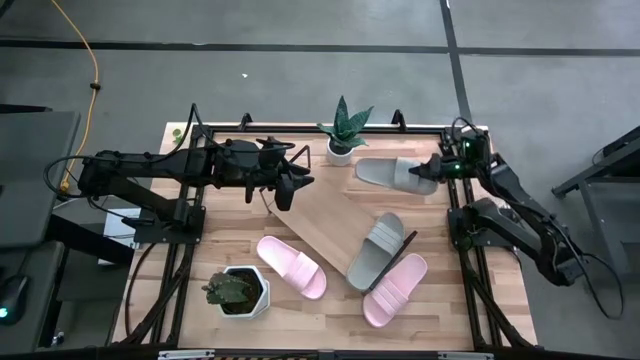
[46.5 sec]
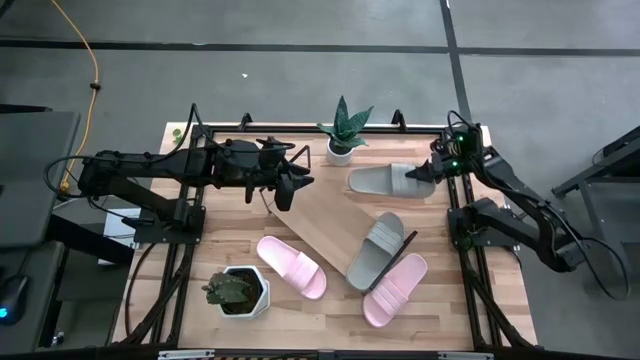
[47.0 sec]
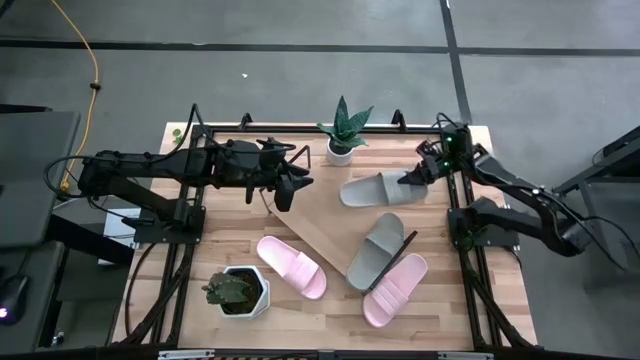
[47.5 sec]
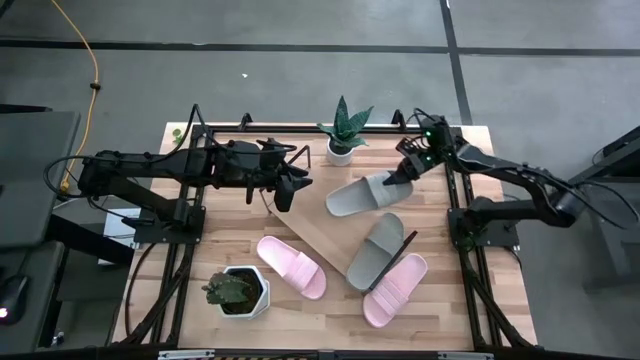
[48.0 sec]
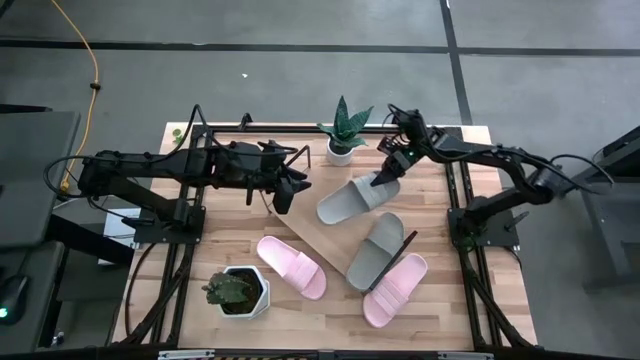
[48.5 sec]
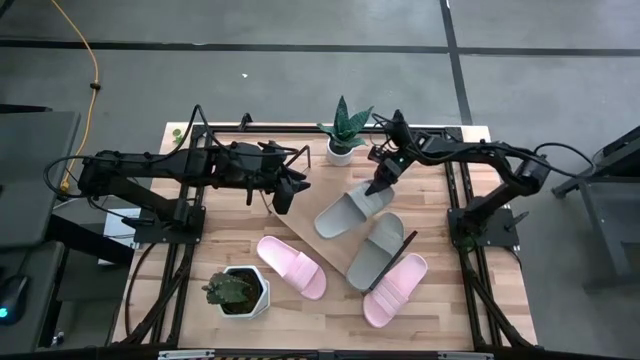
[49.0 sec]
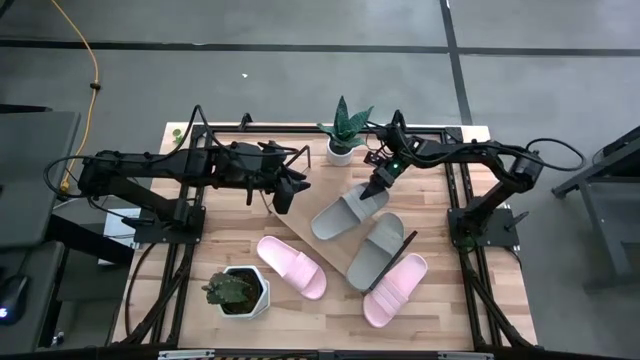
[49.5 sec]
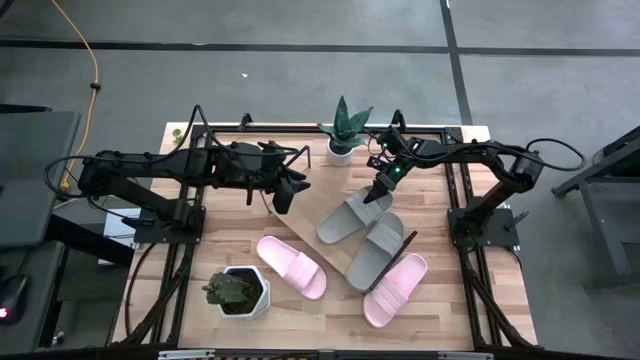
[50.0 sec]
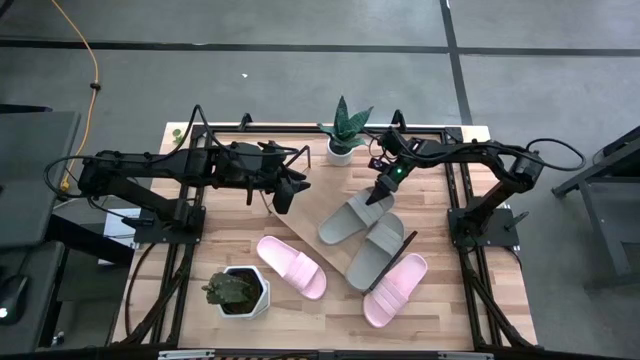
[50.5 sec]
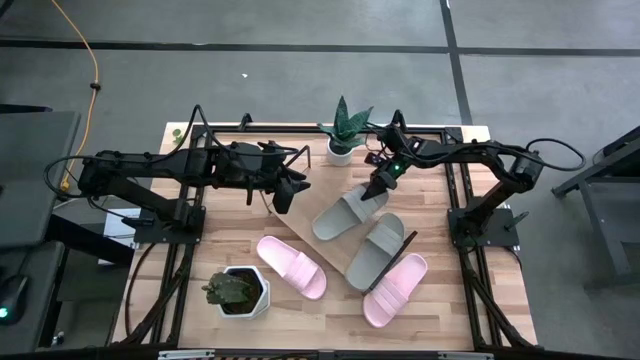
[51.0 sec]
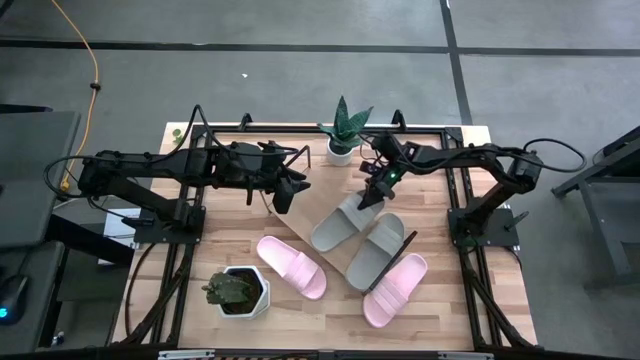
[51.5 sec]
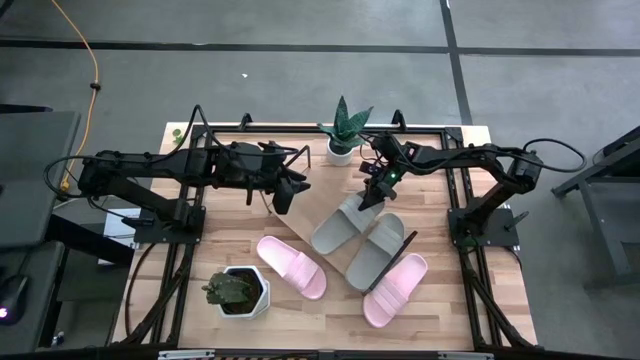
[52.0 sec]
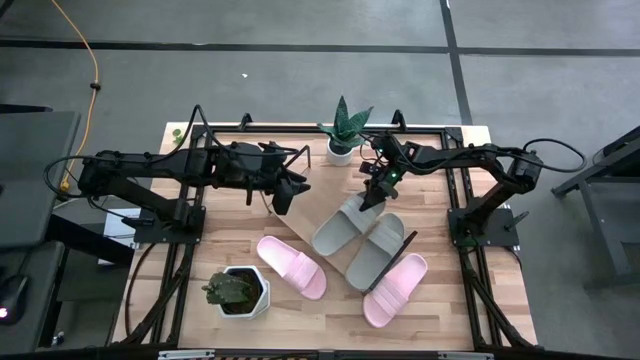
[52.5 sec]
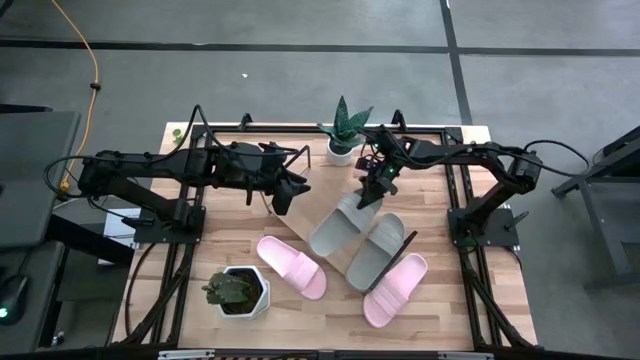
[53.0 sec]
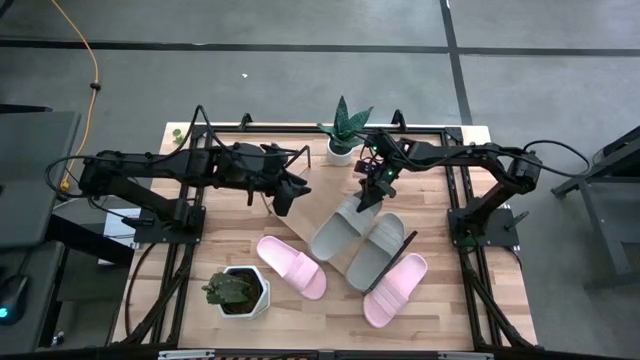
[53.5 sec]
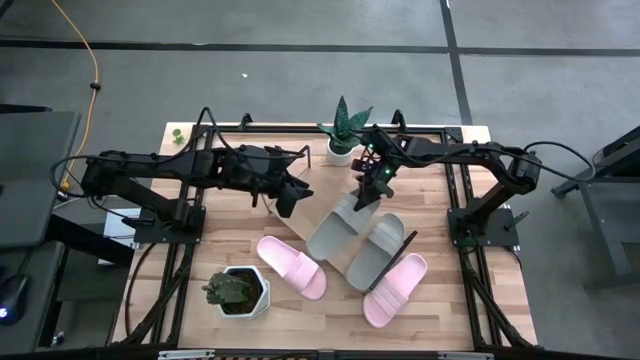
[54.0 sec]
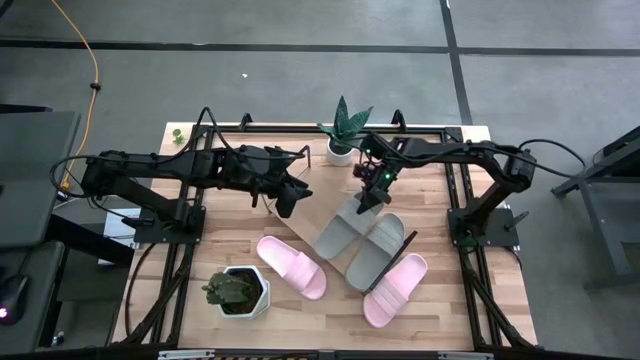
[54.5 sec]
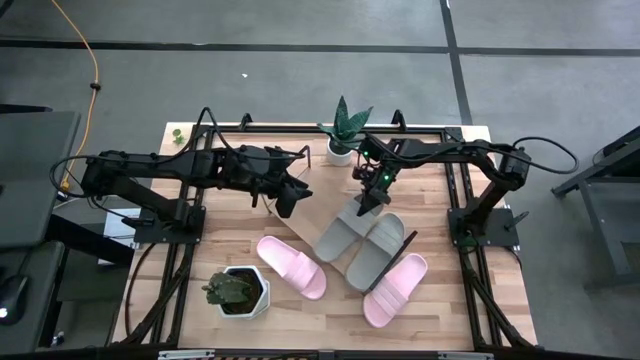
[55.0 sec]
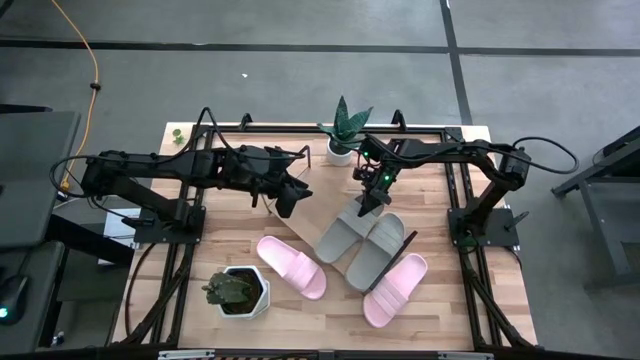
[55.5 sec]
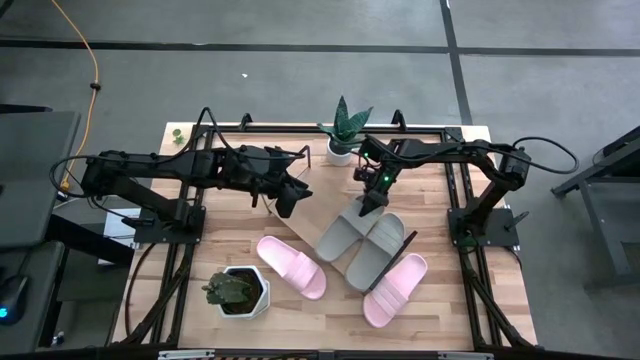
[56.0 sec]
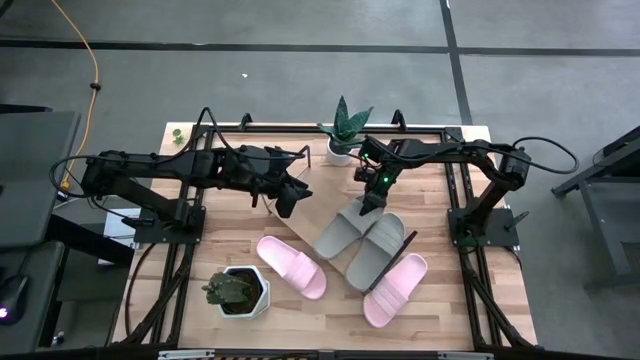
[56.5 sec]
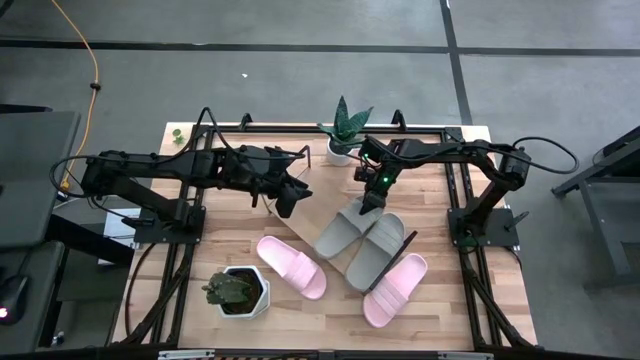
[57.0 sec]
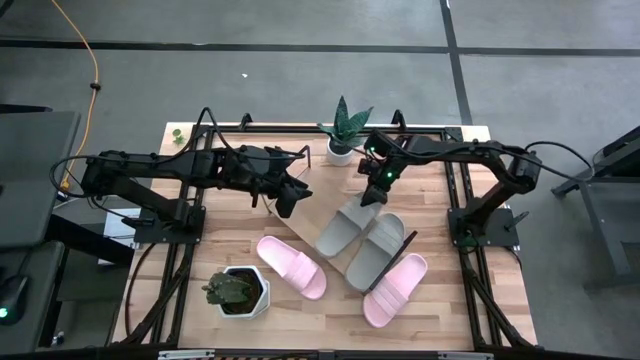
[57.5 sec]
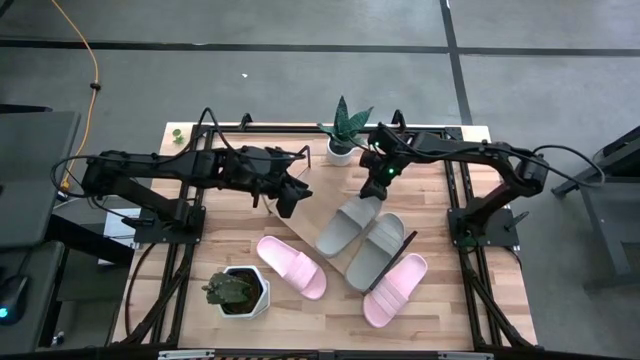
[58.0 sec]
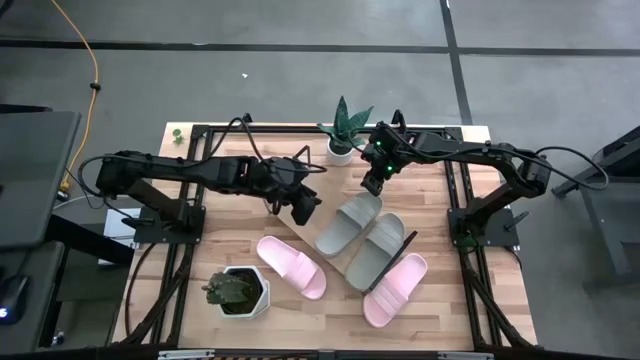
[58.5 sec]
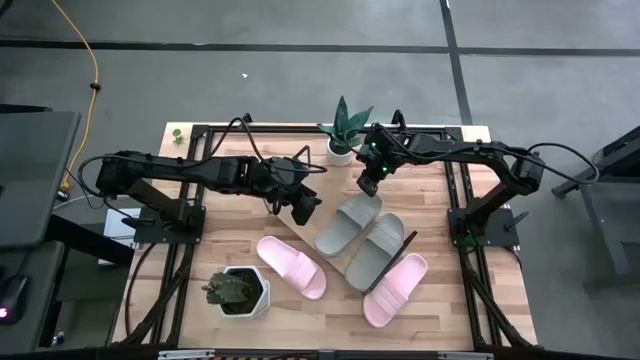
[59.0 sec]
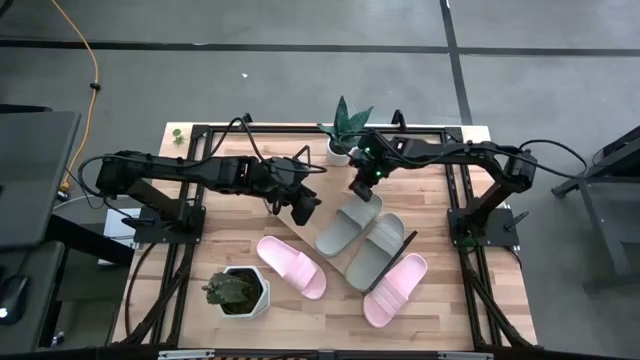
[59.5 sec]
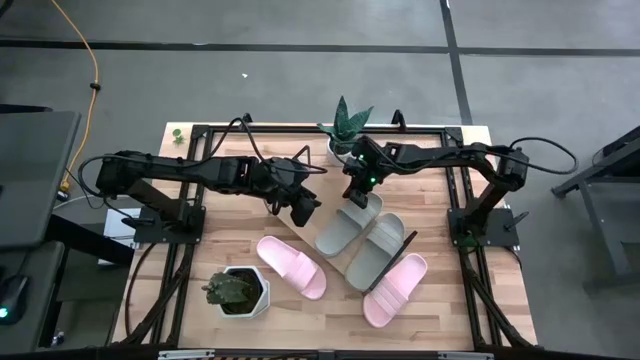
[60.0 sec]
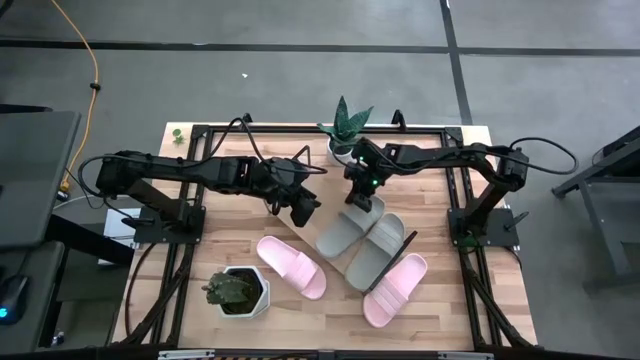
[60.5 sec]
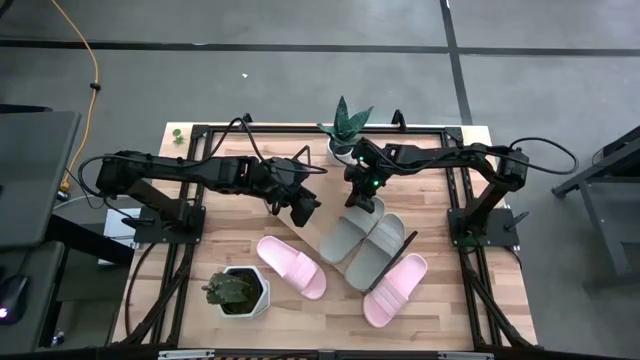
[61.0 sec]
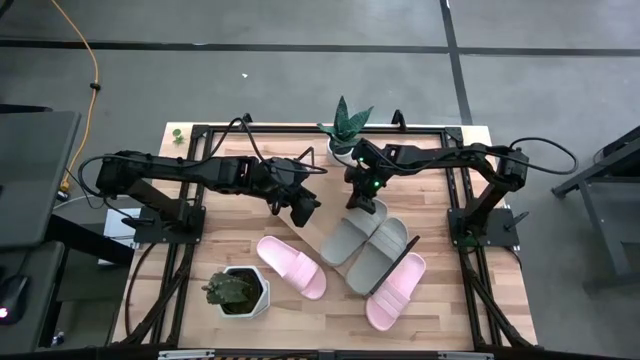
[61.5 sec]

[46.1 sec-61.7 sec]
Task: Pick and place slides into the shelf
Put the gray slide on the shelf

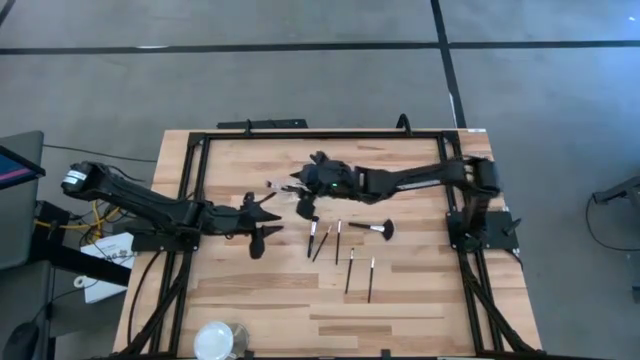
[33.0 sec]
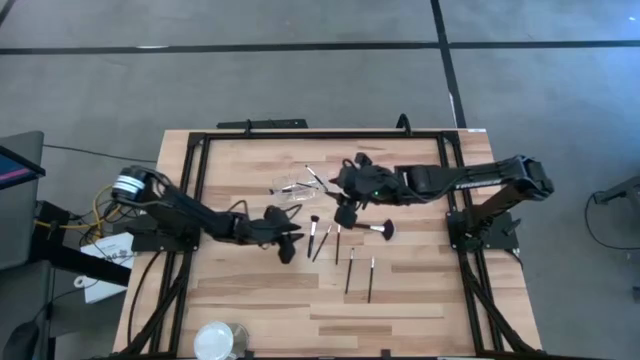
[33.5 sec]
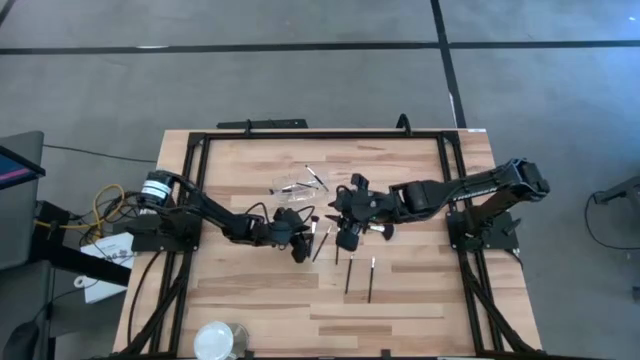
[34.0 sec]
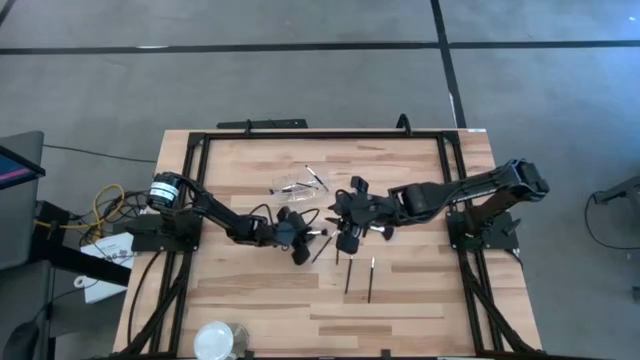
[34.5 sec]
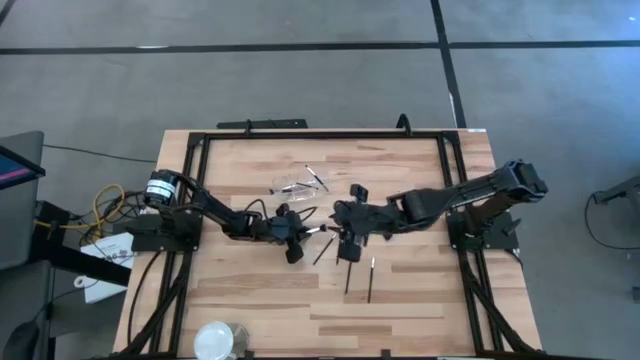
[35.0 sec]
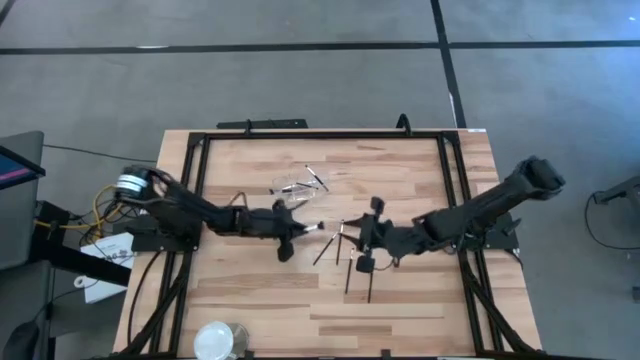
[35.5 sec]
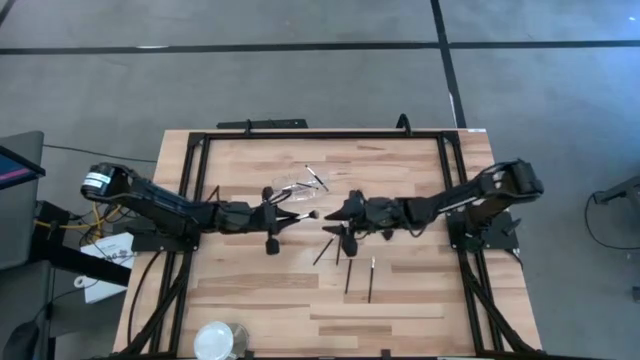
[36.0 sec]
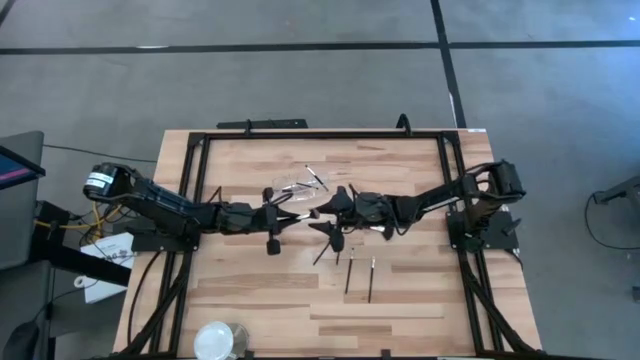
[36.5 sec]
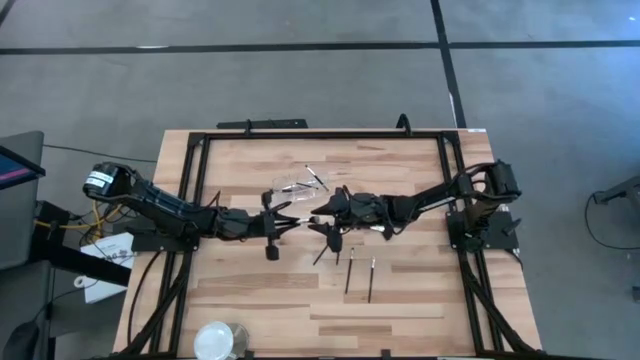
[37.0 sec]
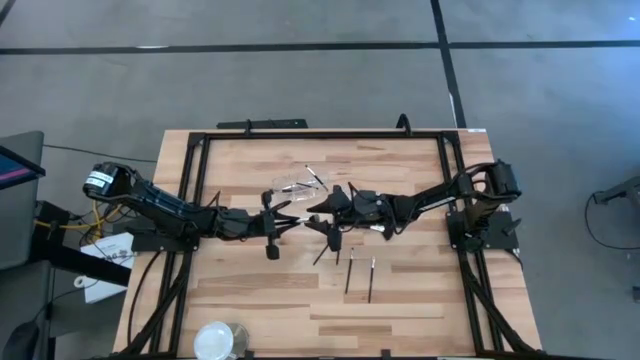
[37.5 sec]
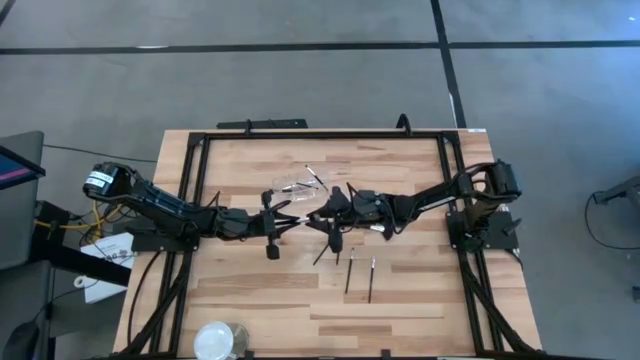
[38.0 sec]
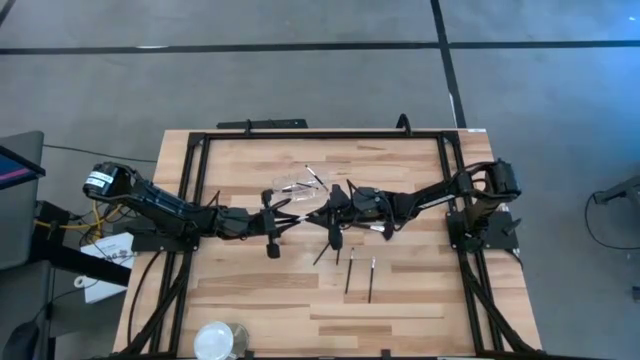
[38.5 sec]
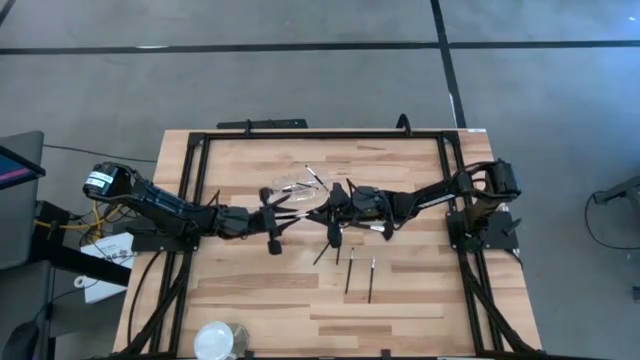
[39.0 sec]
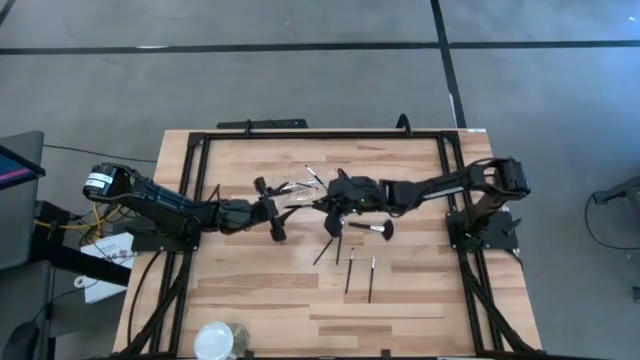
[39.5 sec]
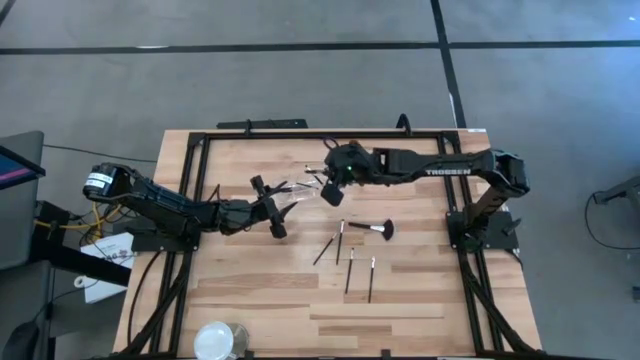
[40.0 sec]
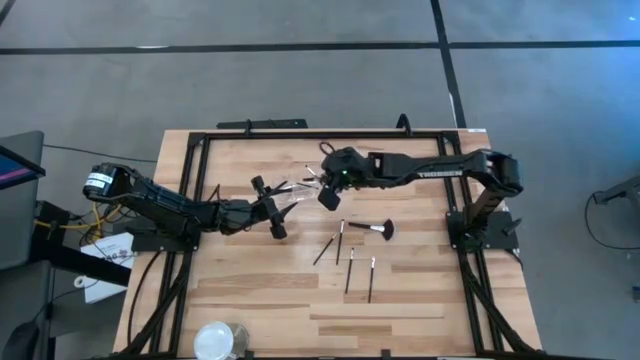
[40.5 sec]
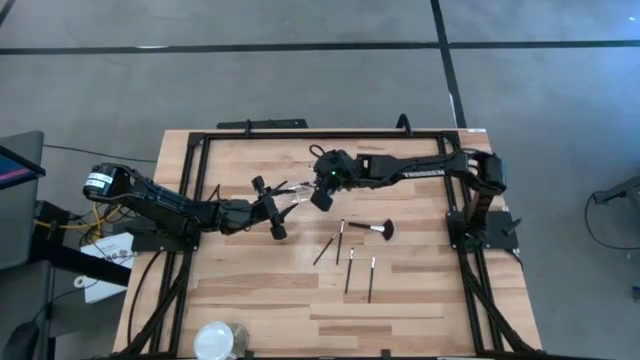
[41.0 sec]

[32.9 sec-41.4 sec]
Task: Put items in baskets/containers
Put the black powder brush into the transparent organizer
